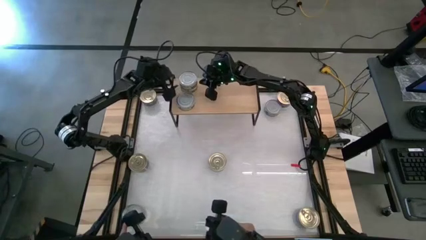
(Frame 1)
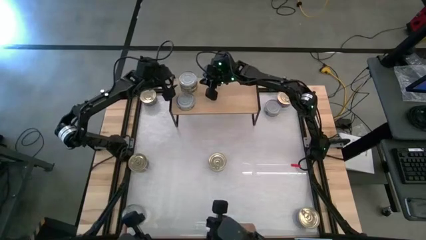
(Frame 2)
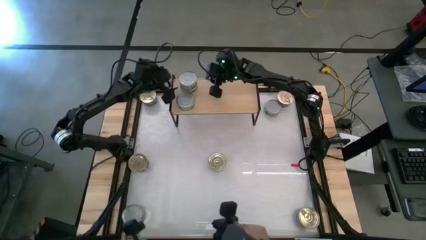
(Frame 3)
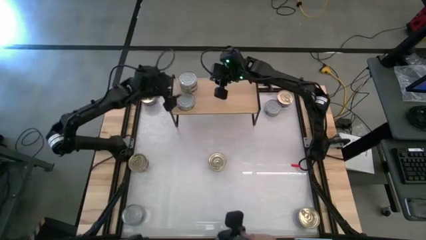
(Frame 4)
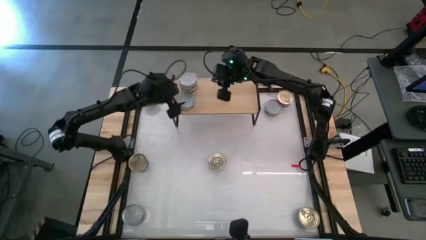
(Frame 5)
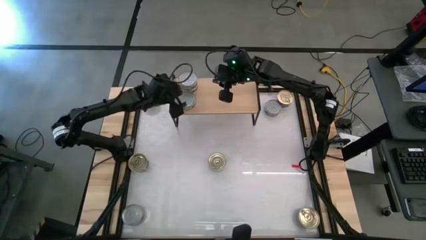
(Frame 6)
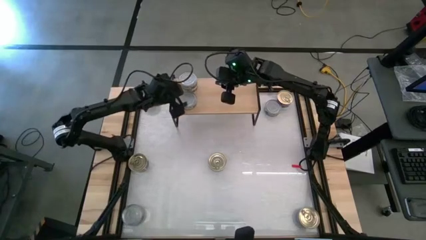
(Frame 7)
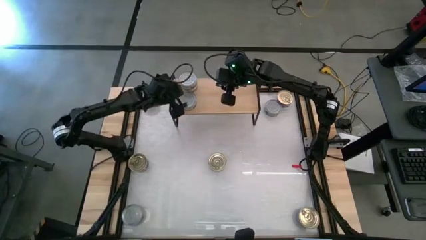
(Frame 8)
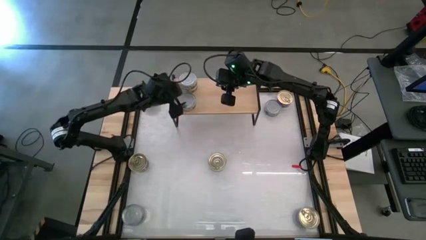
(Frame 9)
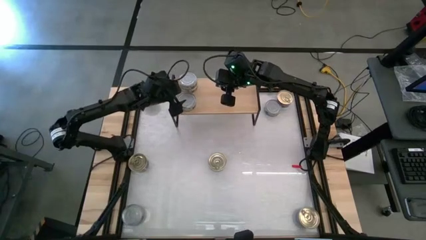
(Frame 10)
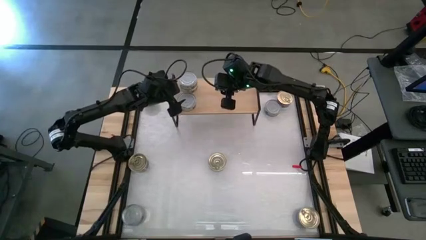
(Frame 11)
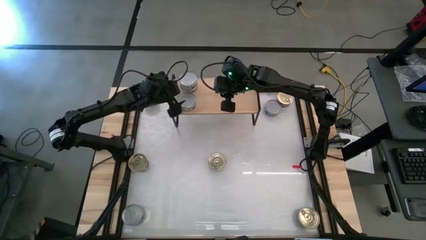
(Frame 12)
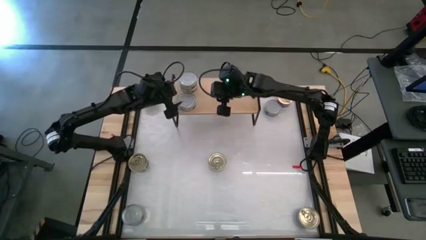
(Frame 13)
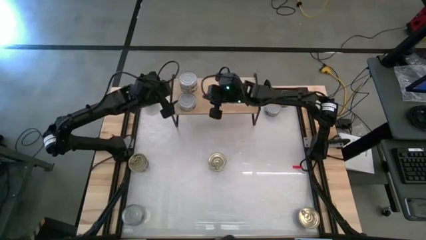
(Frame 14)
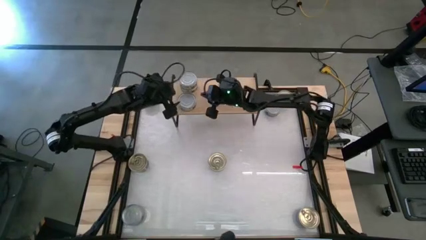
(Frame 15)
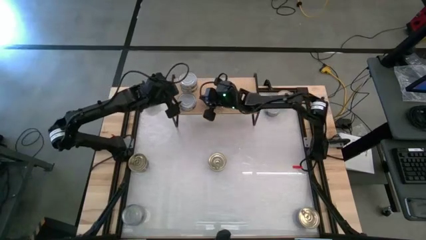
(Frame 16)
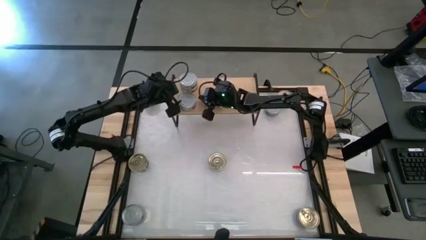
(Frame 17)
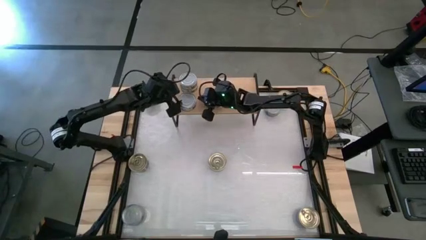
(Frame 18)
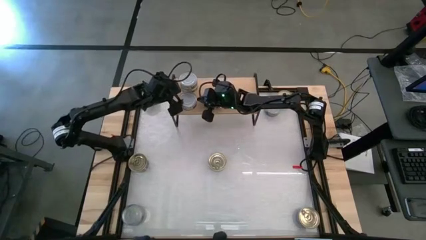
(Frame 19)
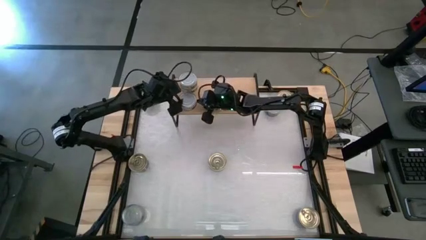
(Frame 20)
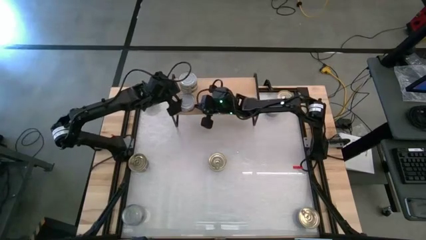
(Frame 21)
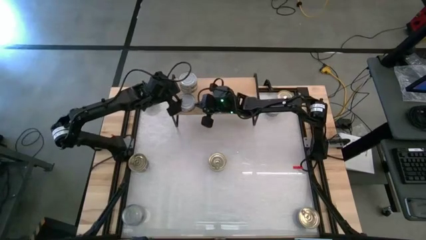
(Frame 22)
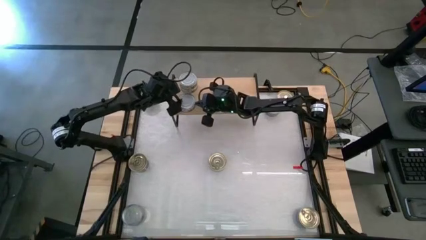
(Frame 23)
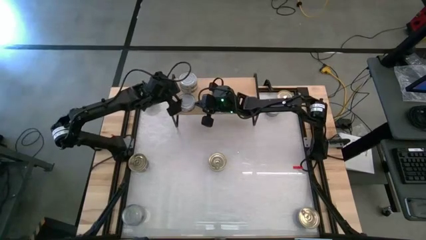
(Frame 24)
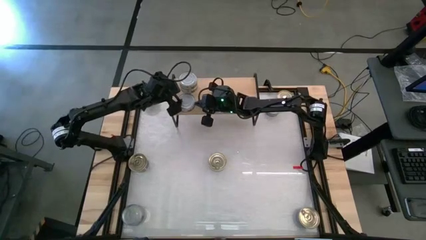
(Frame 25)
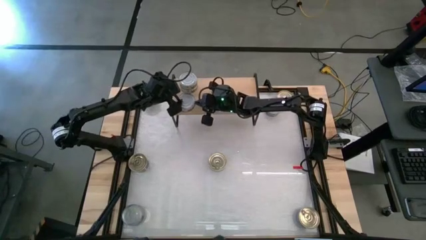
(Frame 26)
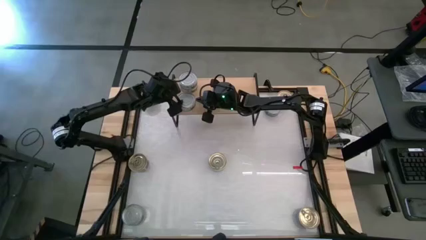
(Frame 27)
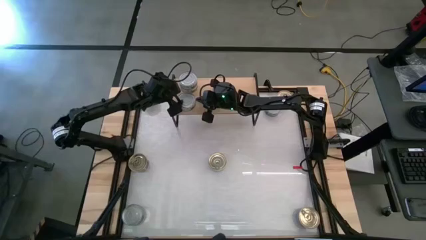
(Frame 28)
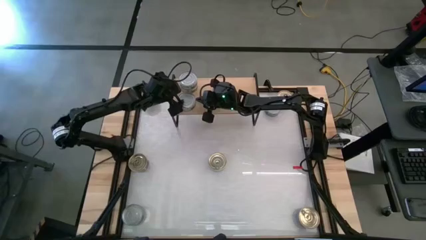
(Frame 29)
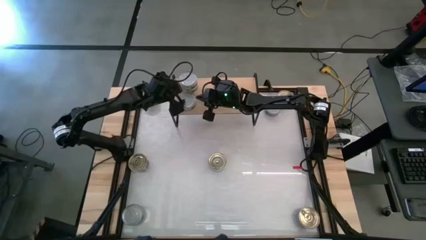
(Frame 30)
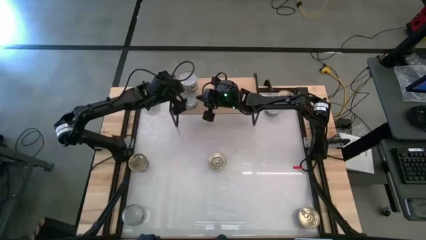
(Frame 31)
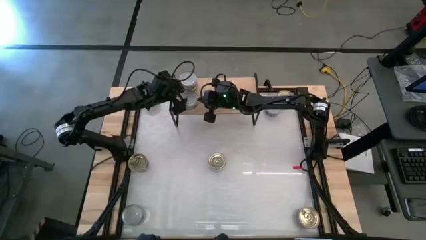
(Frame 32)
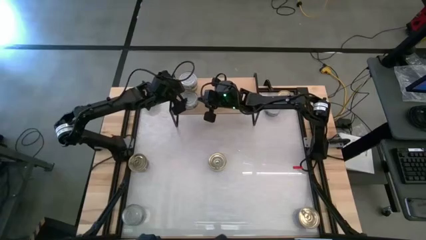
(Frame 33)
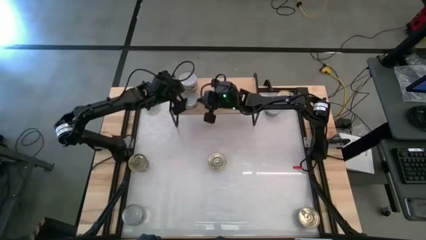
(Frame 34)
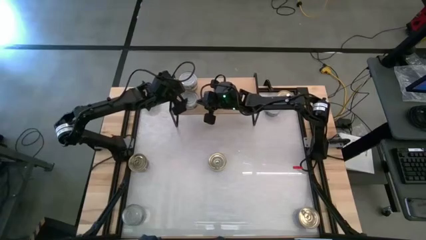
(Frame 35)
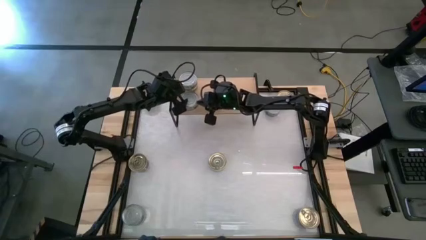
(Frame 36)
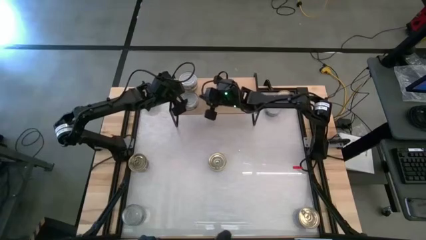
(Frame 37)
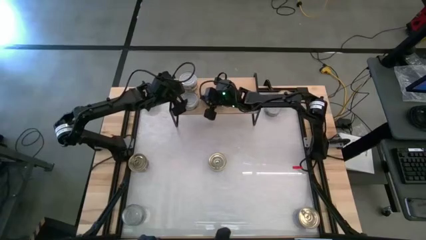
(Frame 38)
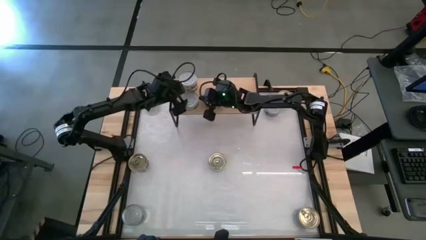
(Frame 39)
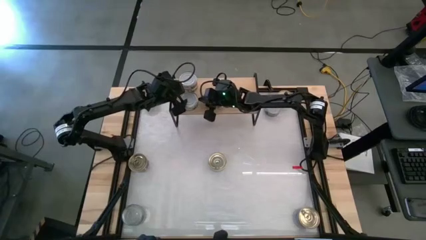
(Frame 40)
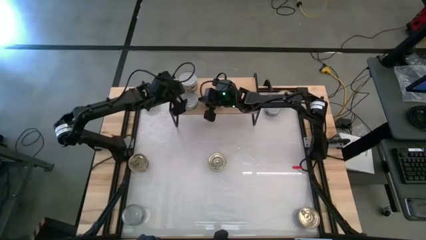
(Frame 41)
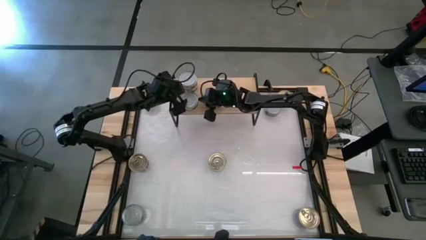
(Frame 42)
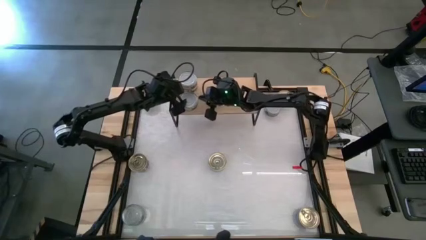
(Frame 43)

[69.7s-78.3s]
Task: Stack canned seafood by type on shelf
Adjust the green tuna can on the shelf
